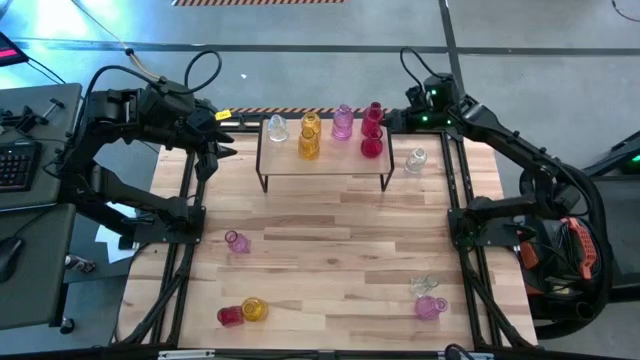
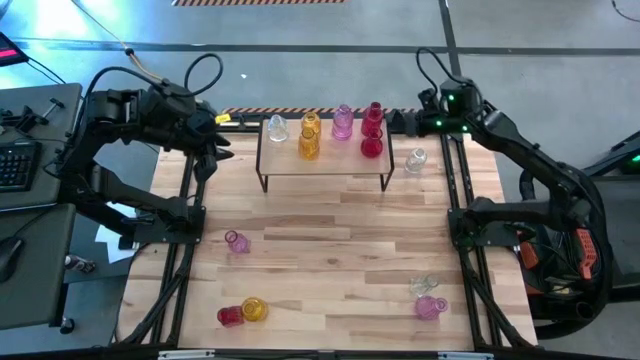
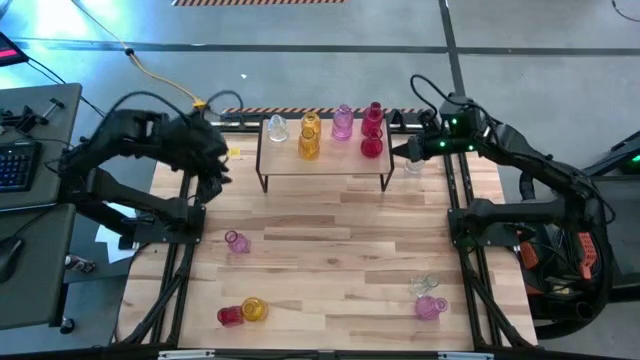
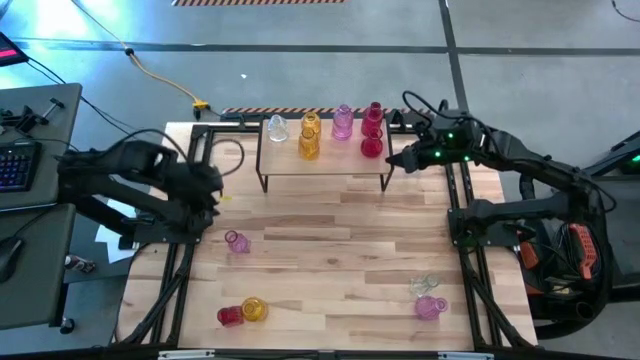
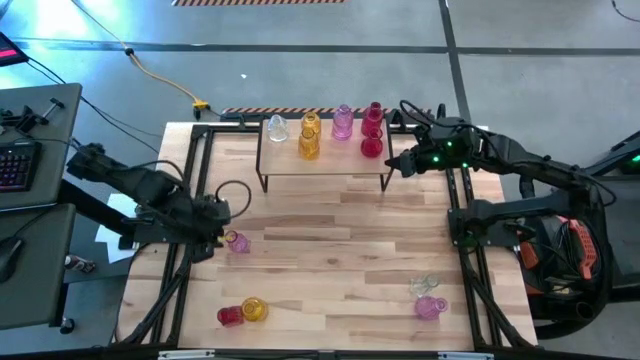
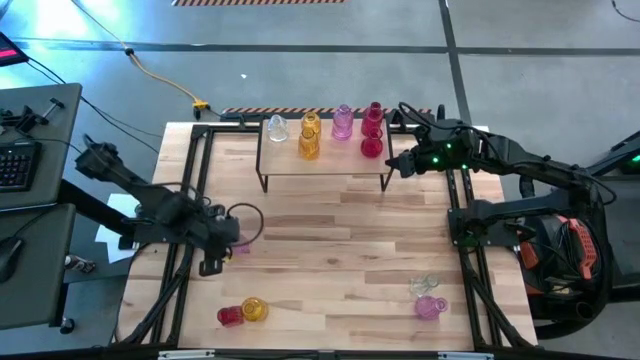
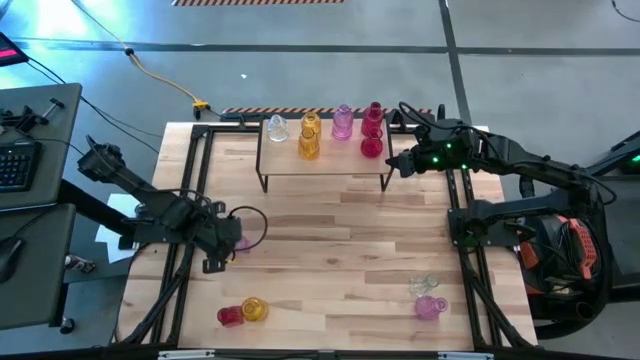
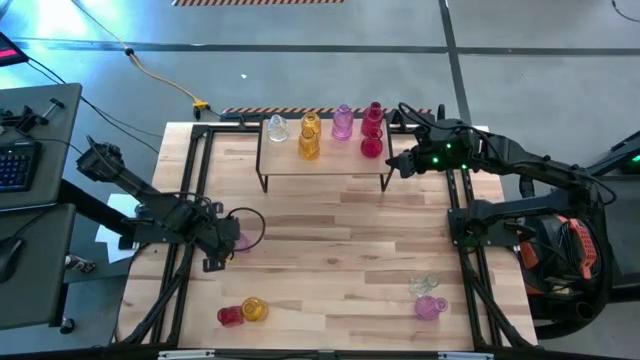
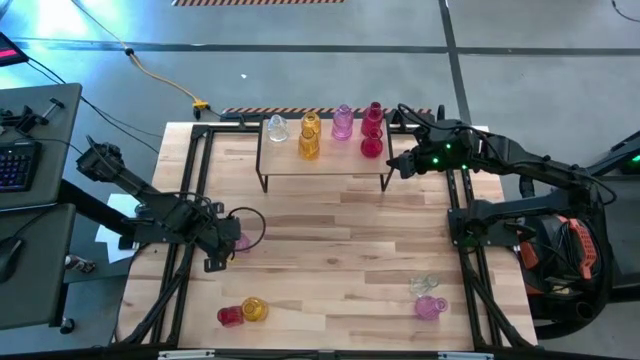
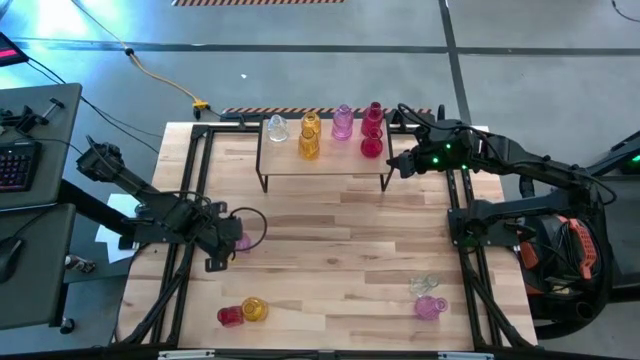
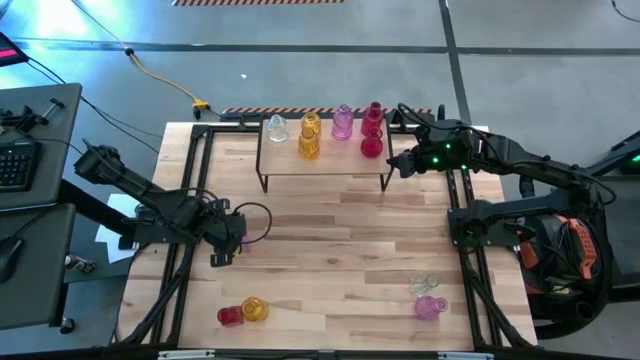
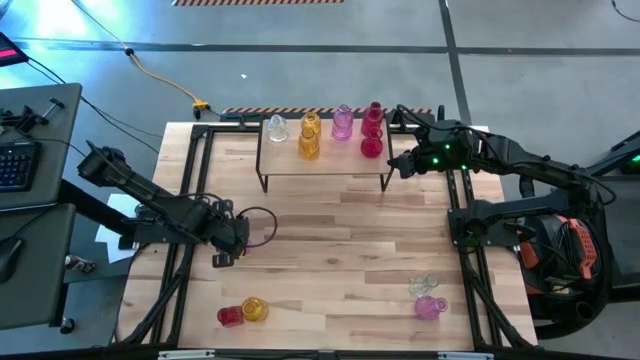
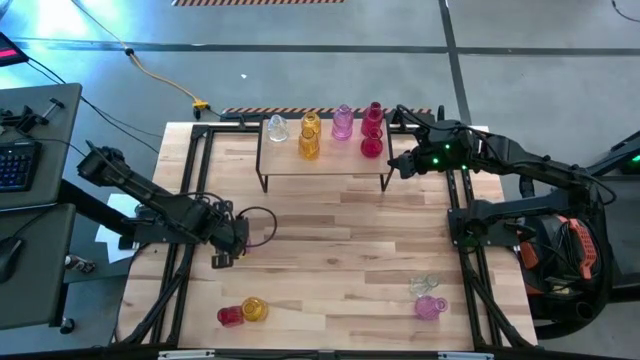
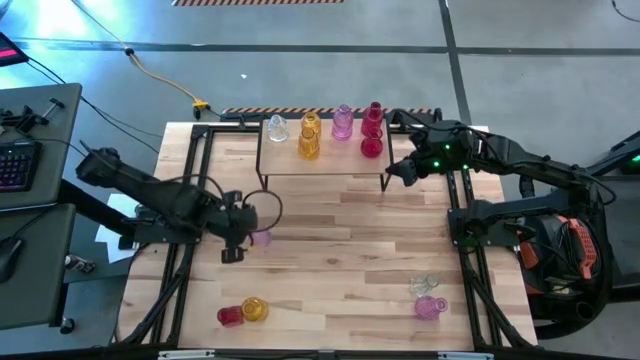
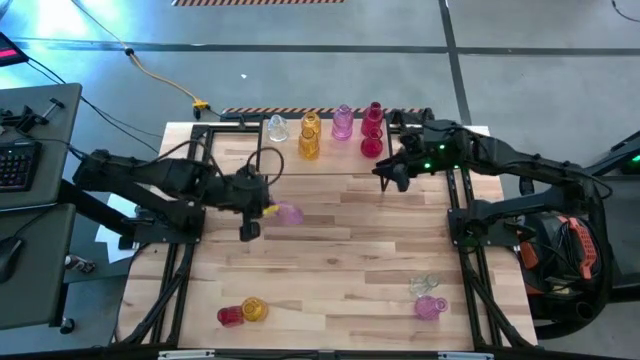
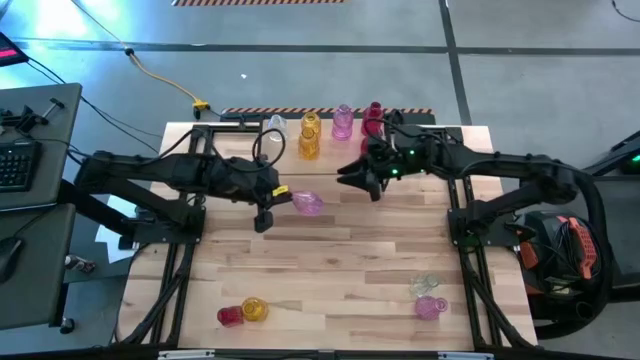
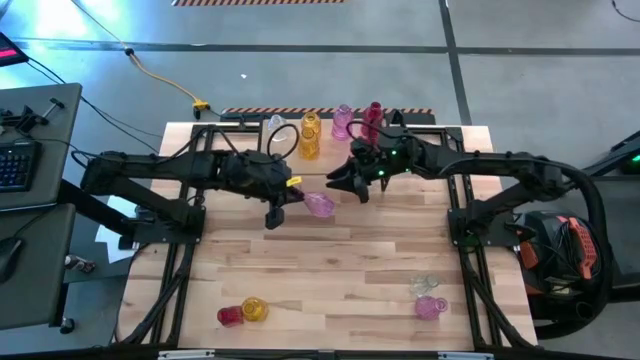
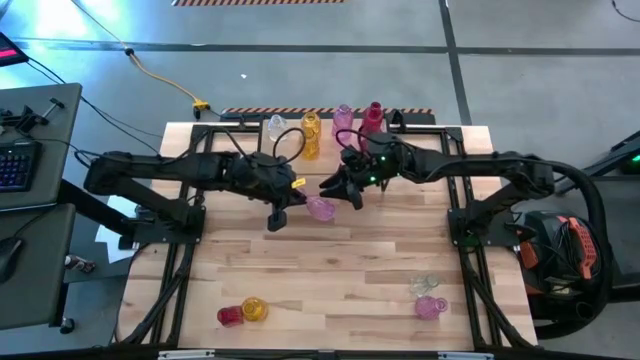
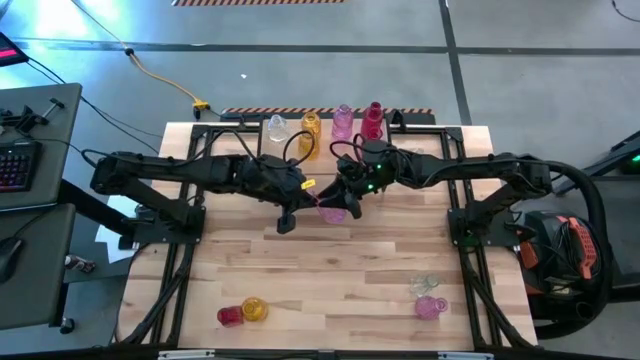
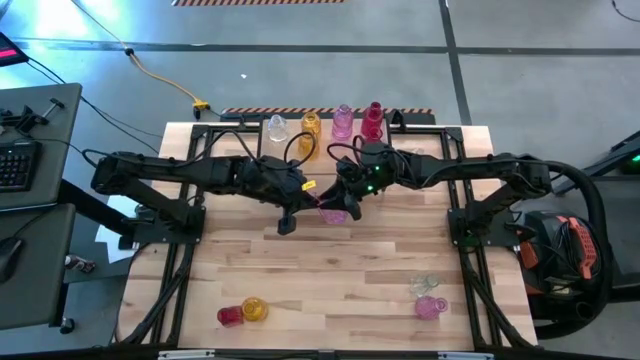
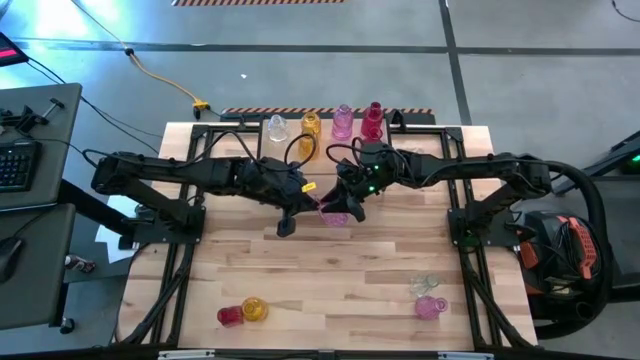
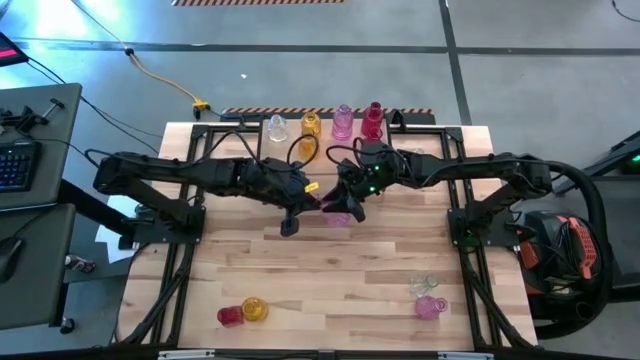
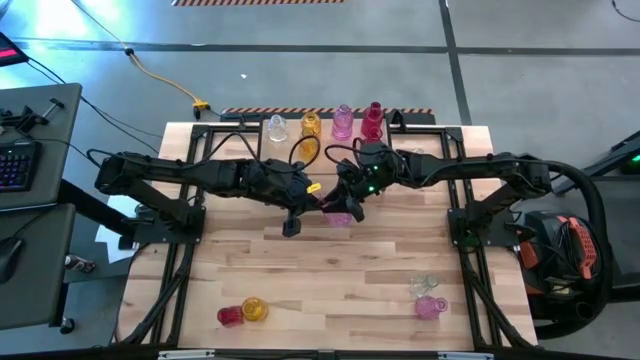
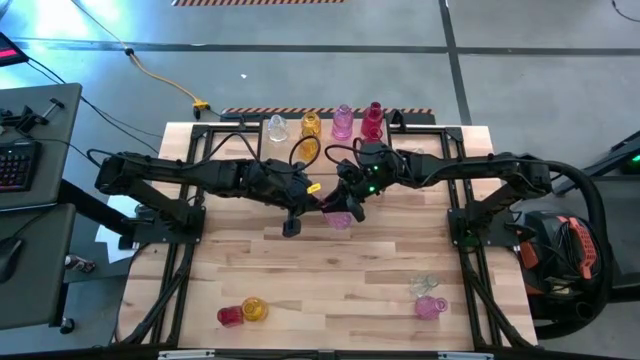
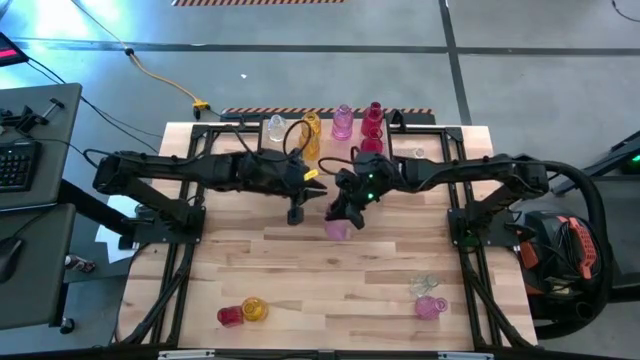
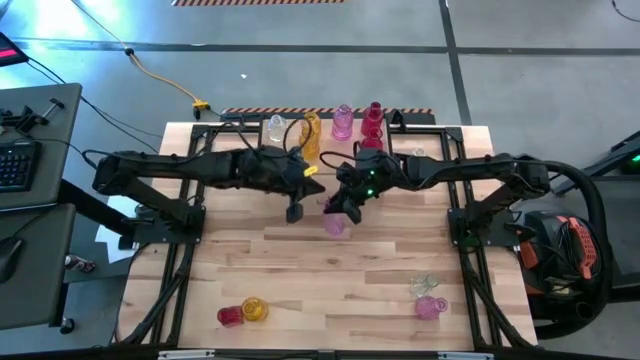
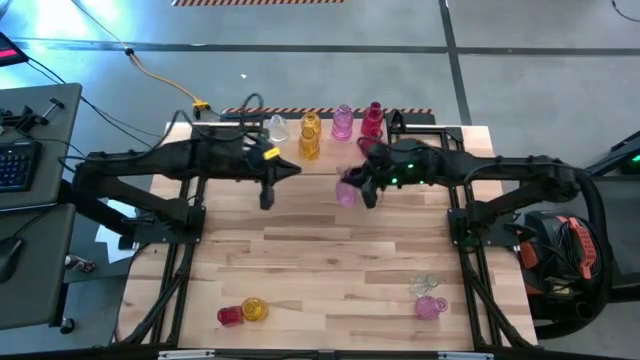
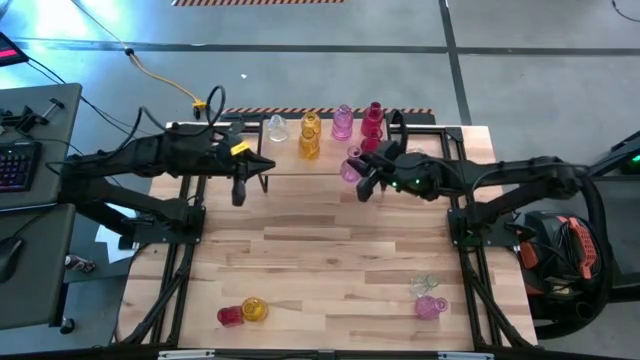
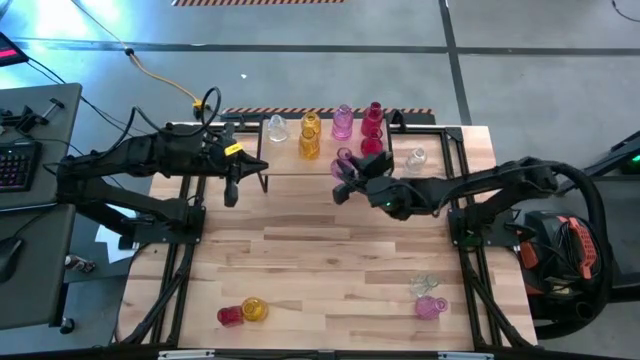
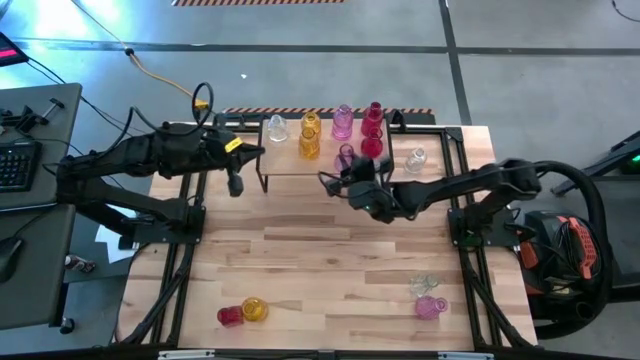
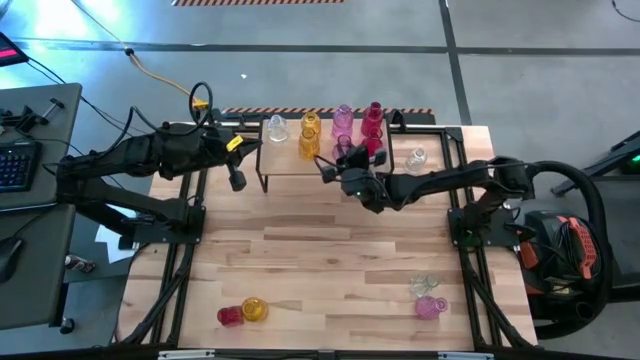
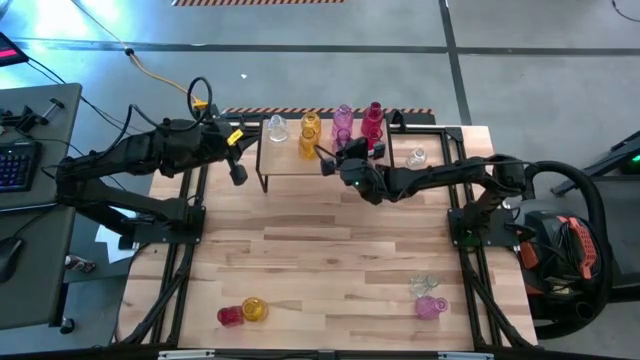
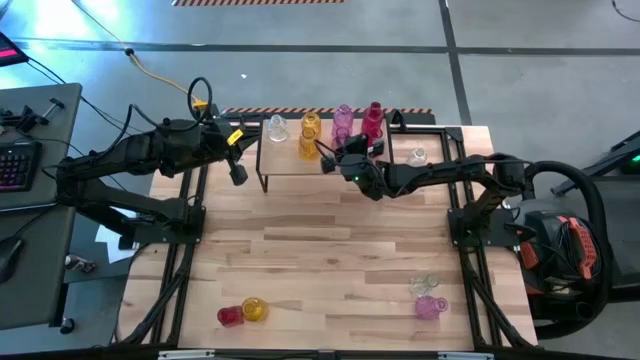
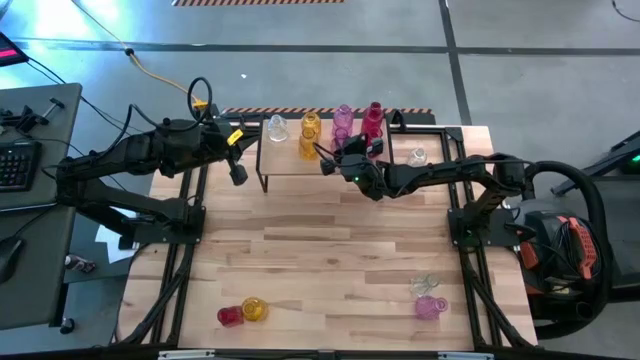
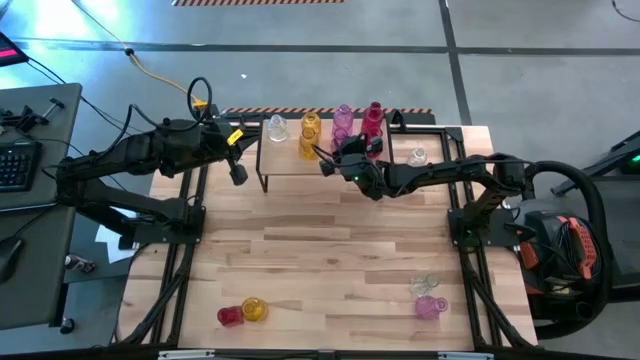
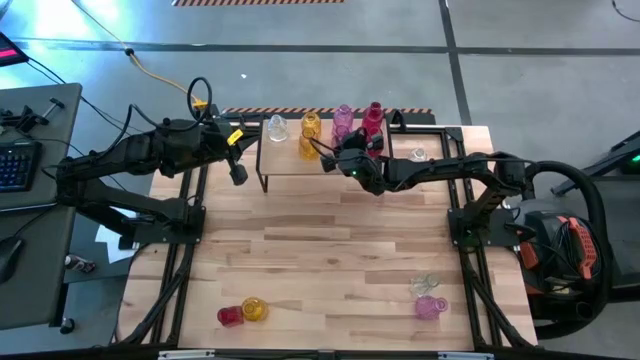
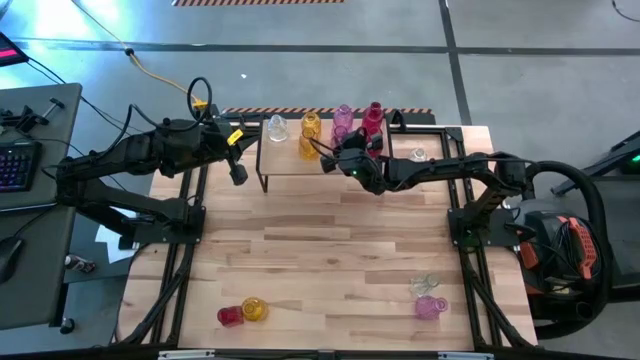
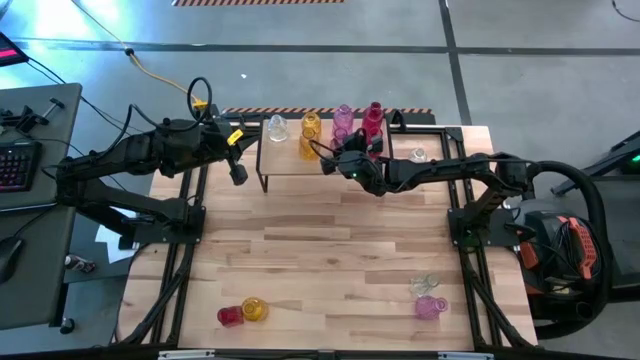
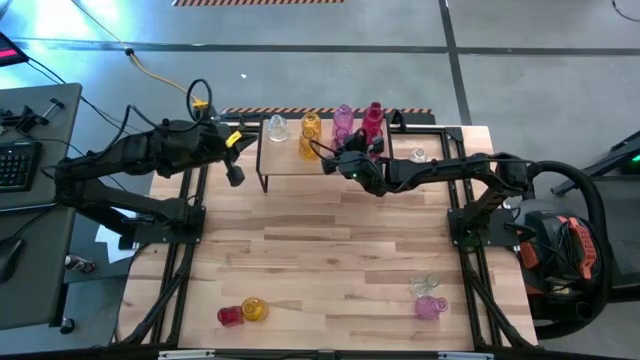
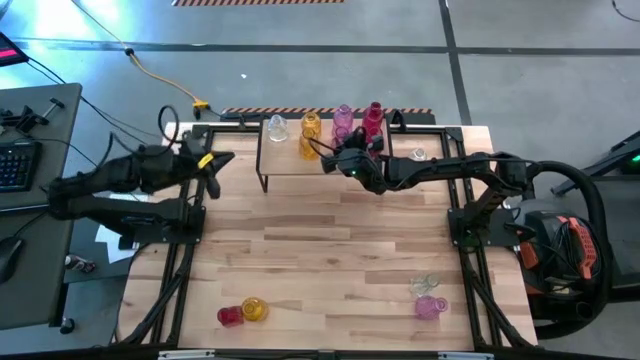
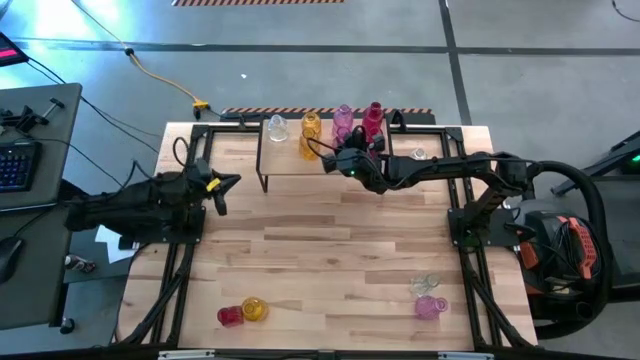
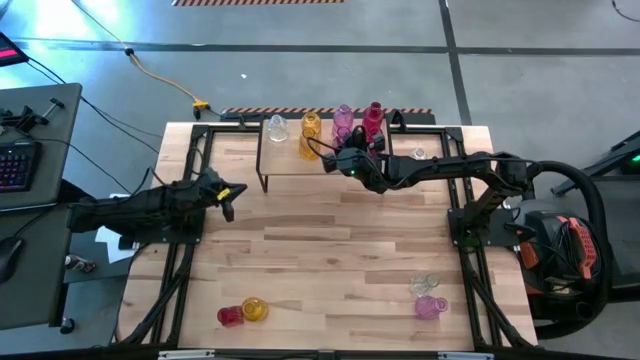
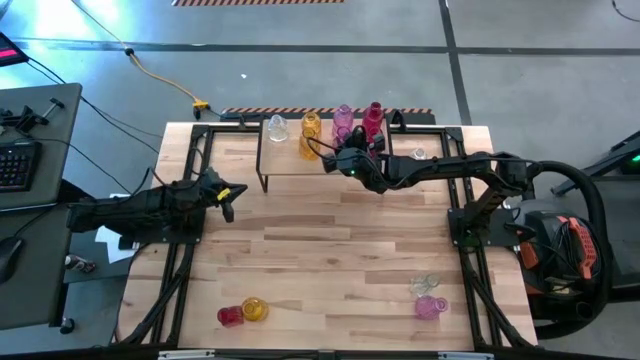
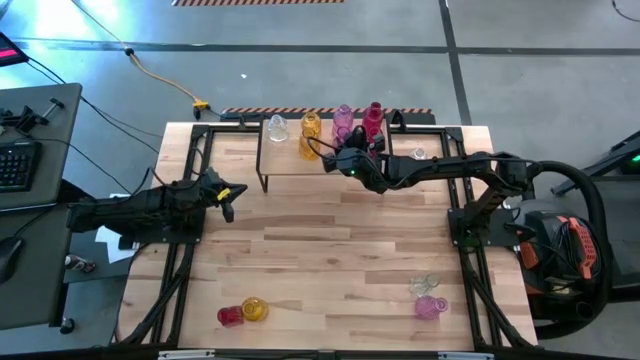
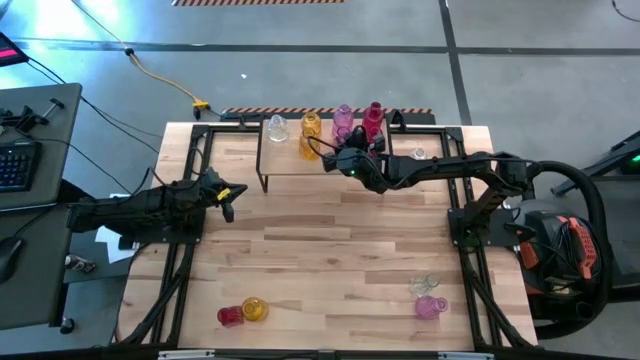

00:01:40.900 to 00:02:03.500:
Task: sort vases onto shelf
Put the top violet vase aligned with the other violet vase on the shelf
